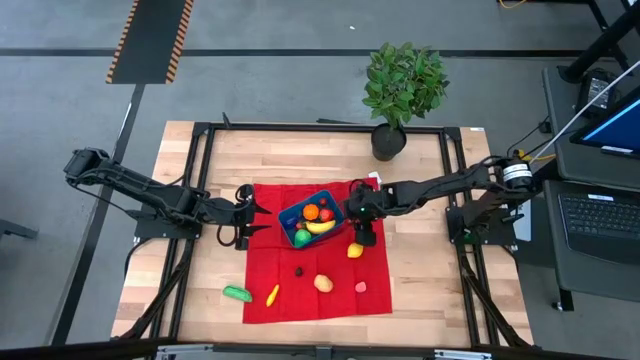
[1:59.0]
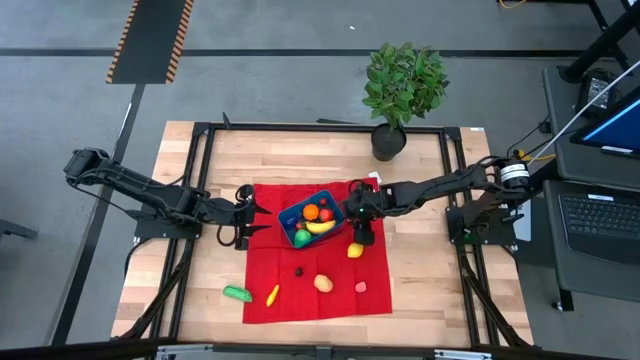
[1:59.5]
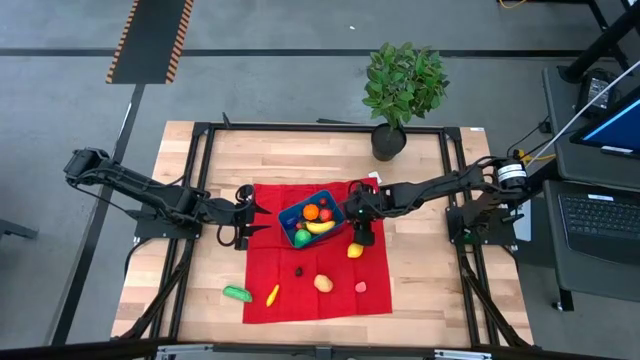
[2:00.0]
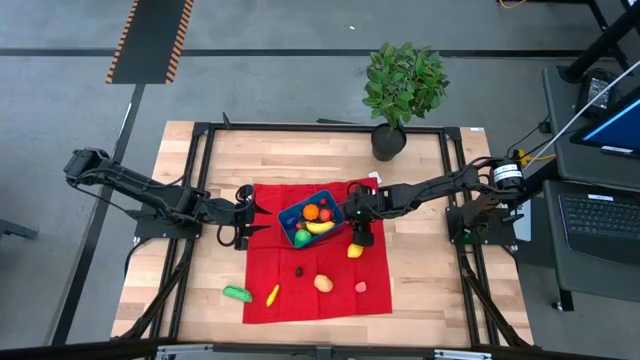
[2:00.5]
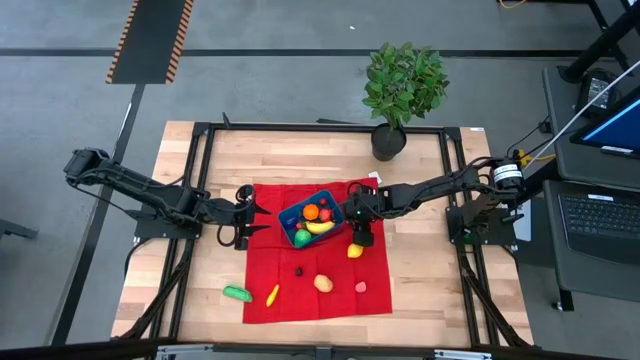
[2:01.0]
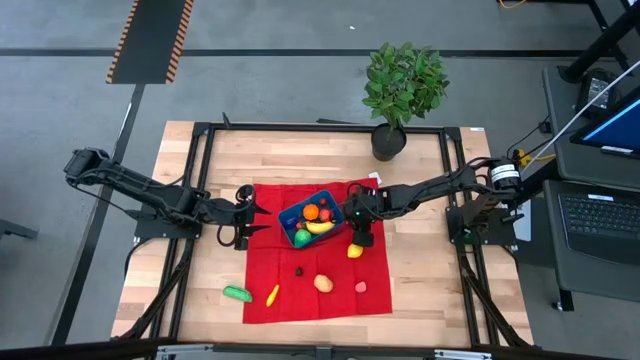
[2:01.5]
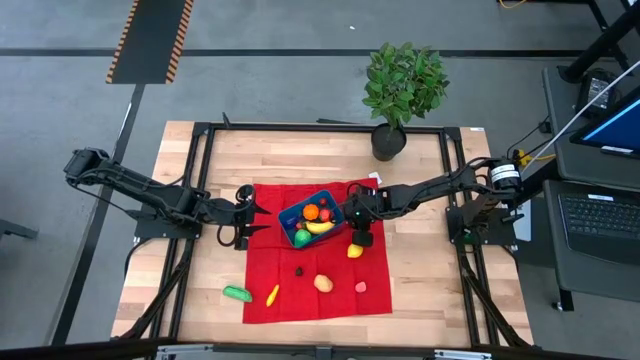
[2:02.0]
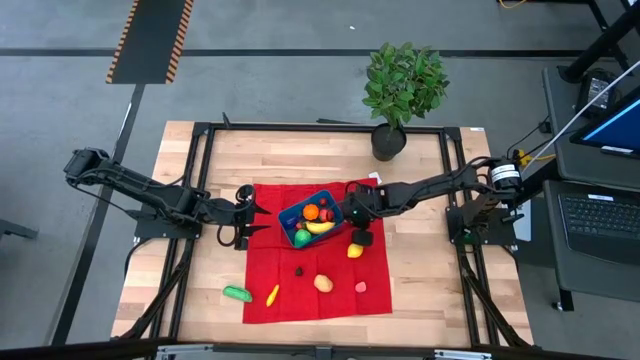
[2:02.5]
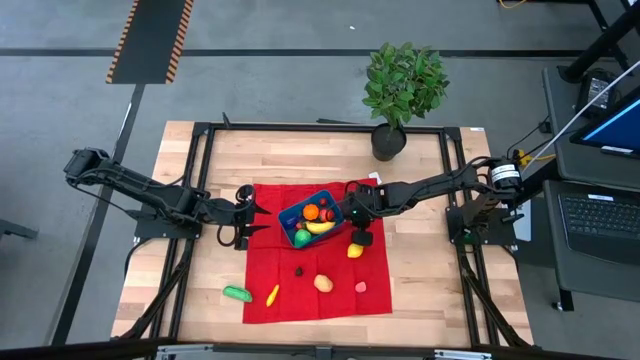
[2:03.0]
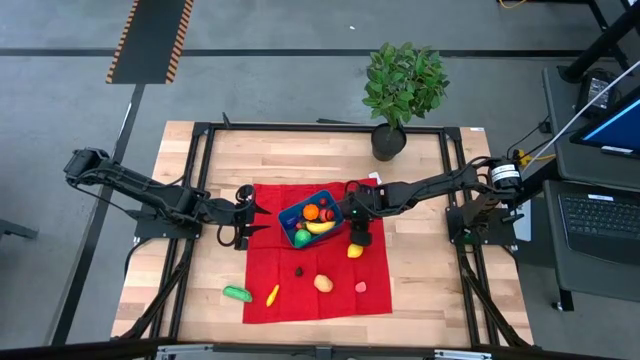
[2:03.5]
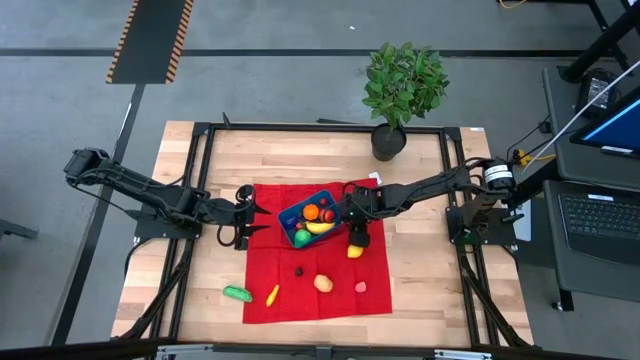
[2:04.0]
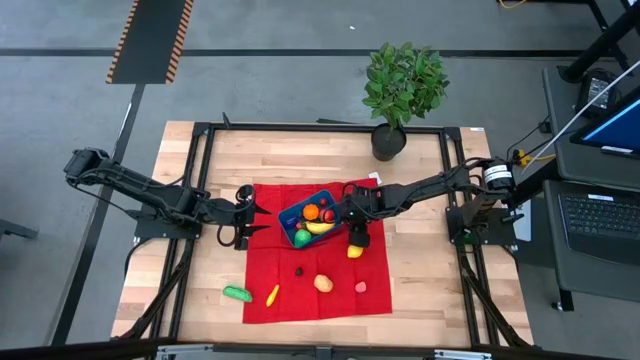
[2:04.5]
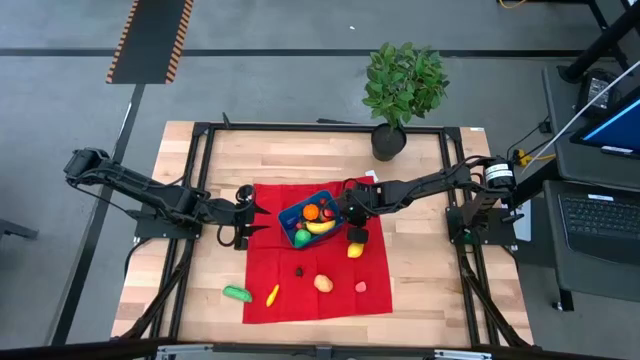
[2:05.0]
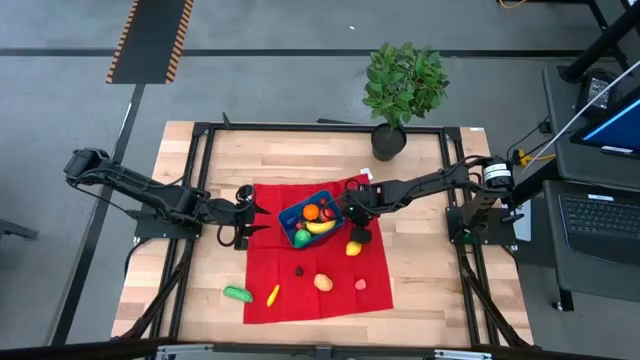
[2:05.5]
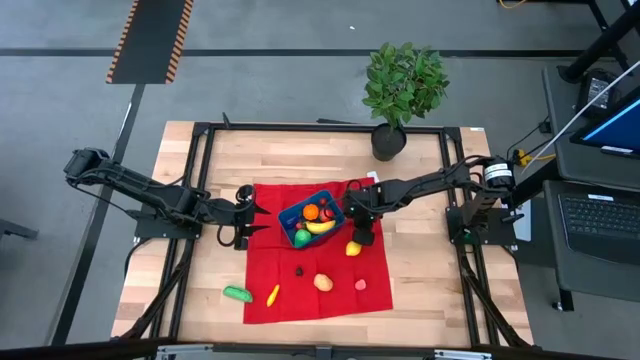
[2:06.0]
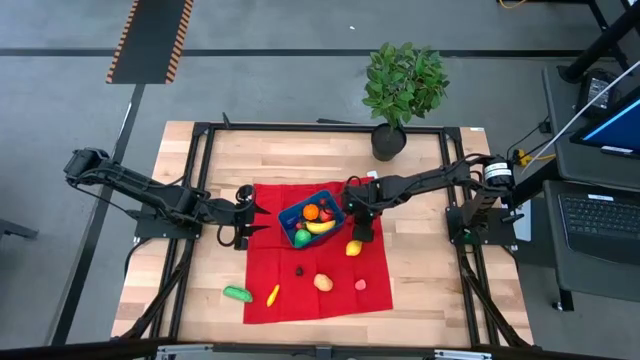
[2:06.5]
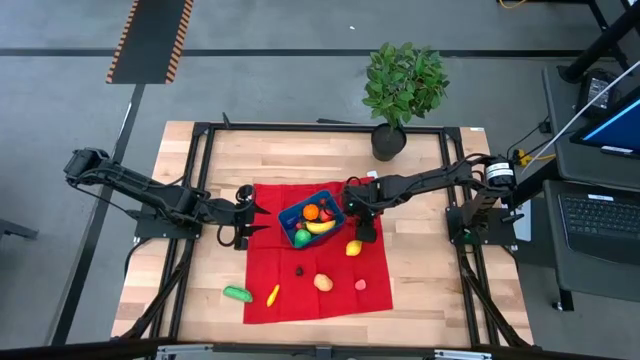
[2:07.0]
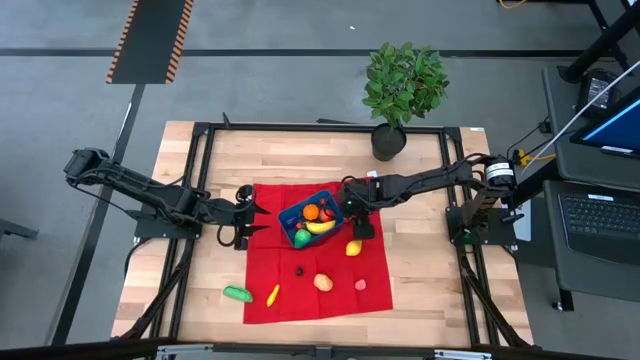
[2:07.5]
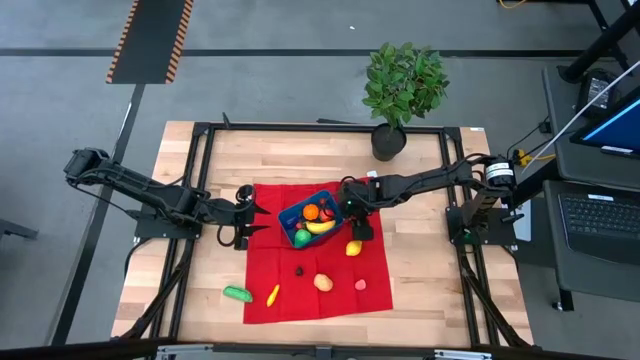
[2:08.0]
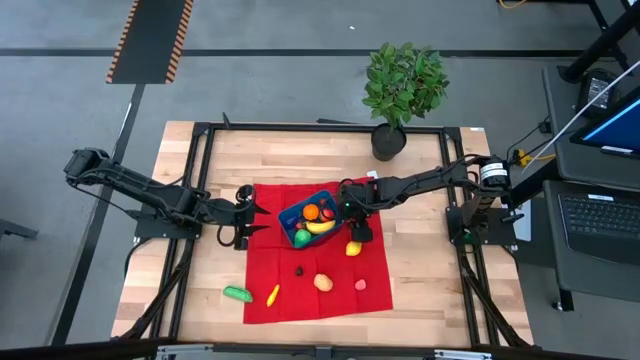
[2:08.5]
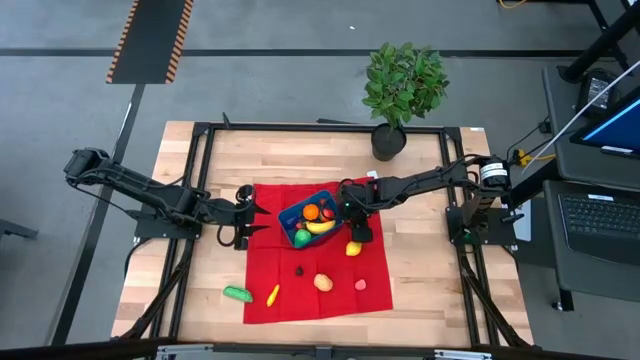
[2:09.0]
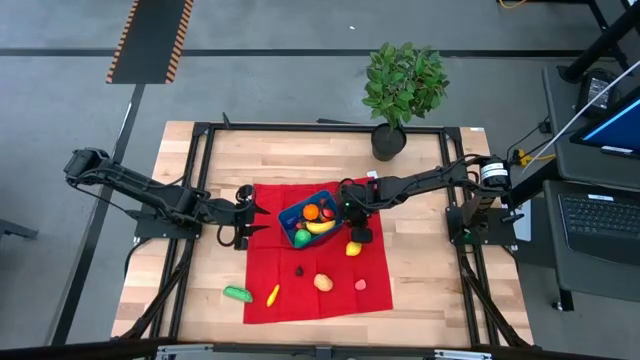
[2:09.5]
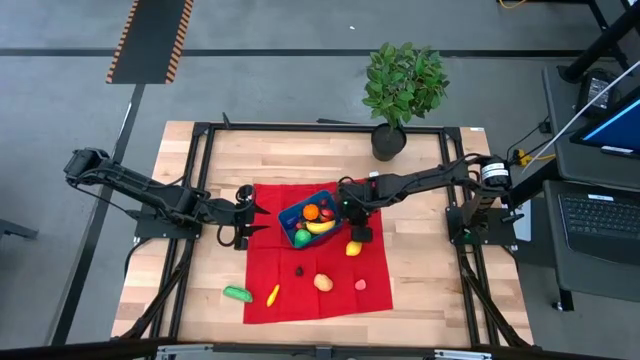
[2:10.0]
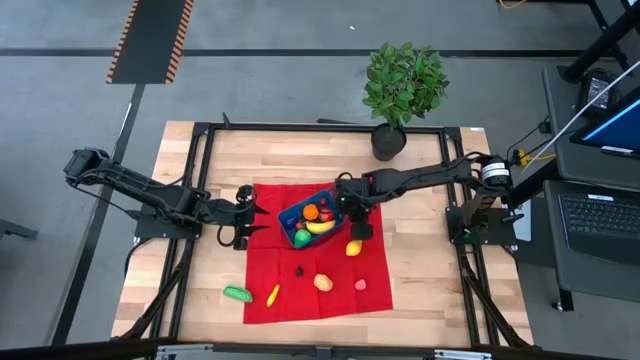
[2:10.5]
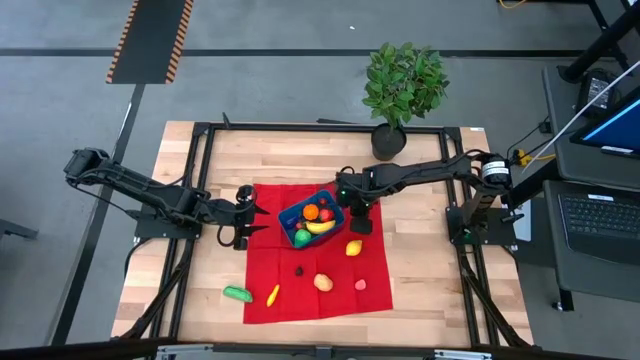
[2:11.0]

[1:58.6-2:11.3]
Task: Pick and placing Produce into tupperware
Put the raspberry into the blue bin

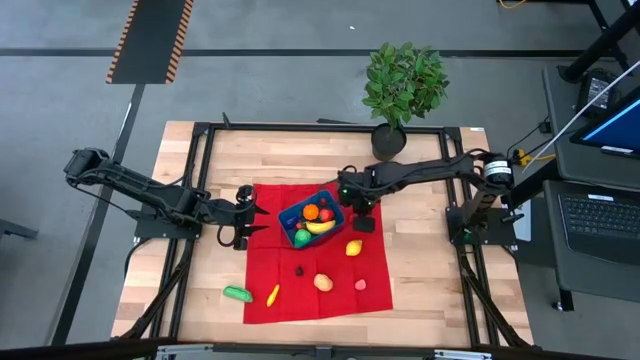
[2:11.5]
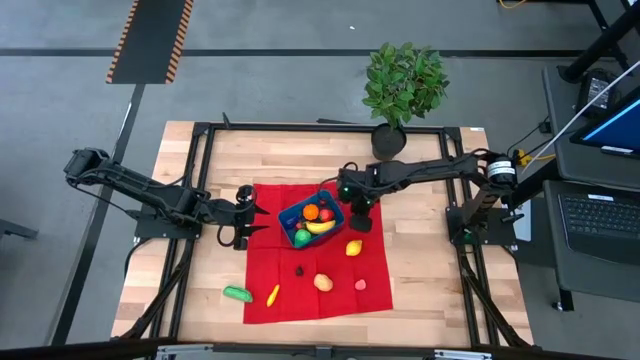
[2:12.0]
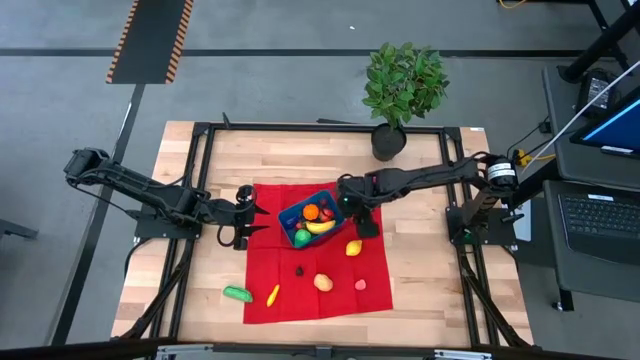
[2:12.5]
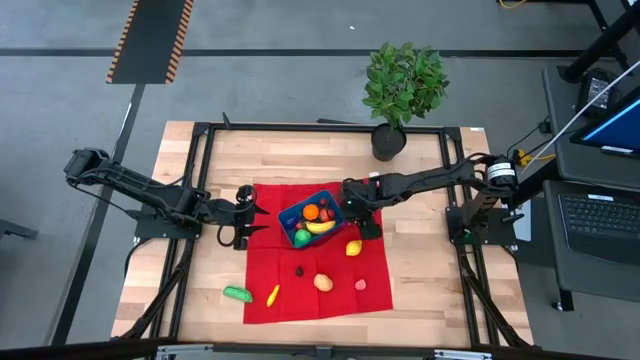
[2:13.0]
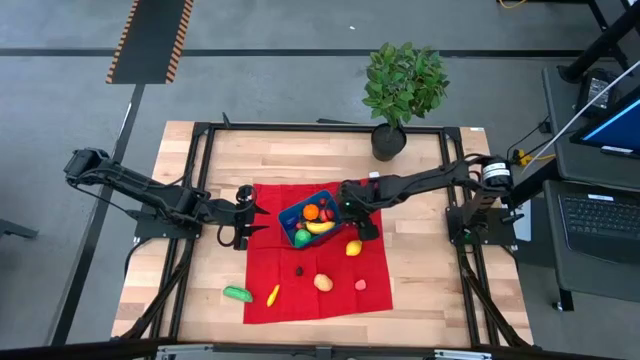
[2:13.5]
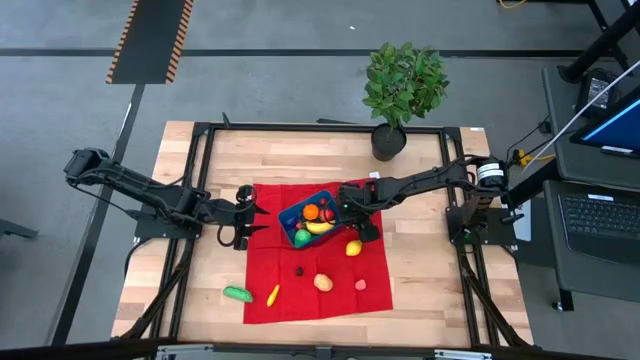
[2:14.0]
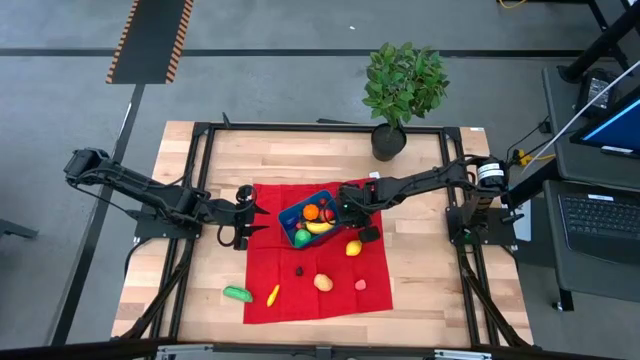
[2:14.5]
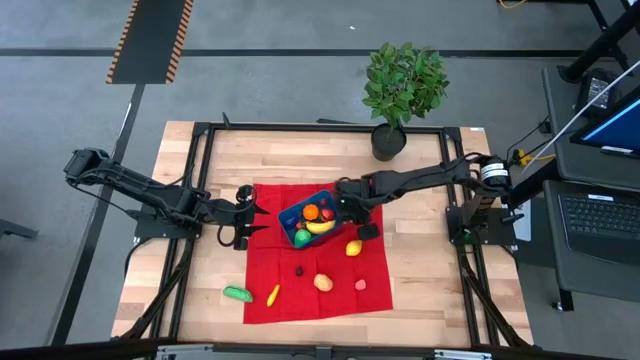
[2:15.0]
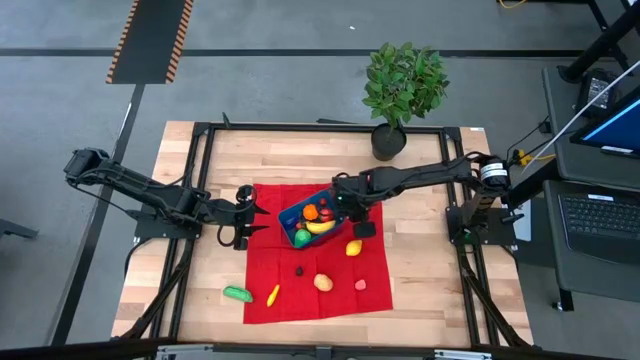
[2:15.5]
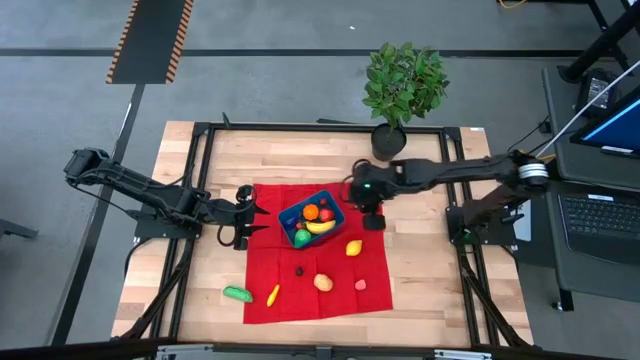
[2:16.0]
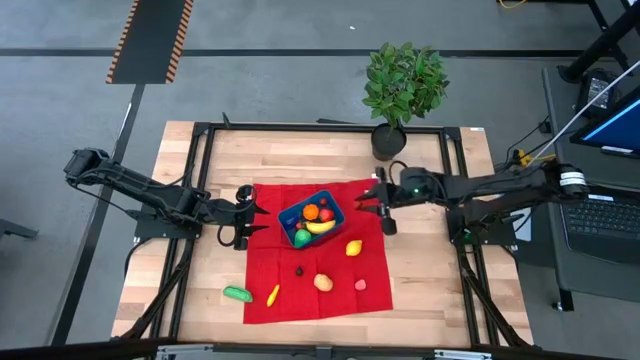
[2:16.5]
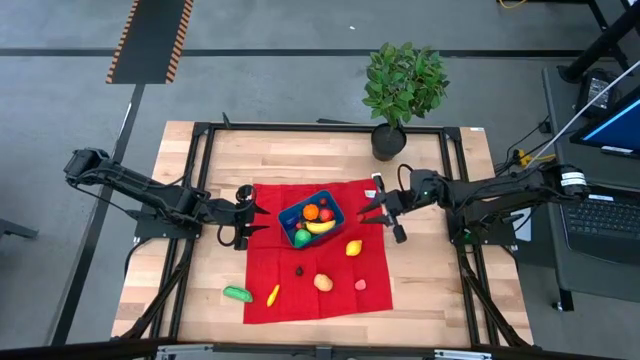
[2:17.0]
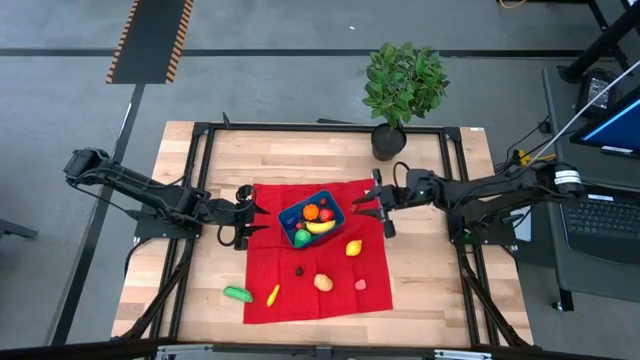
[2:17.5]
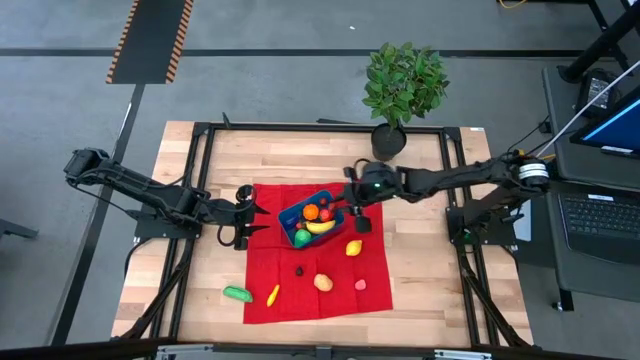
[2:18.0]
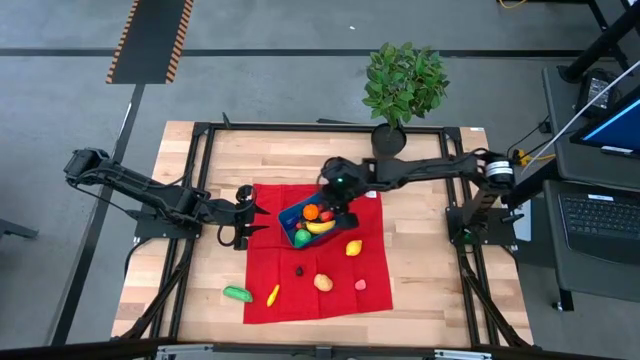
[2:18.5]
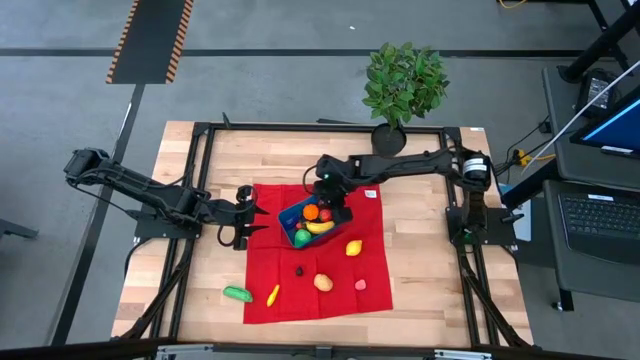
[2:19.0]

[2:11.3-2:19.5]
Put the raspberry into the blue bin
